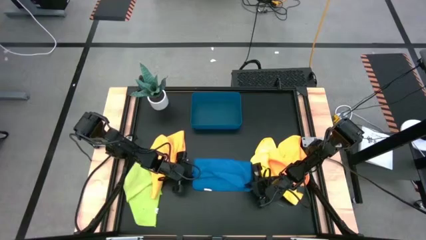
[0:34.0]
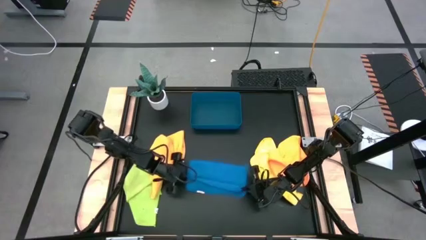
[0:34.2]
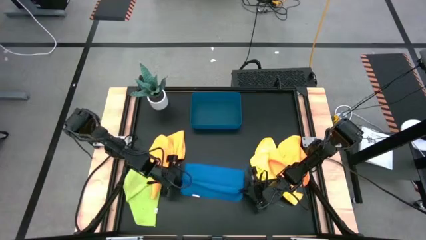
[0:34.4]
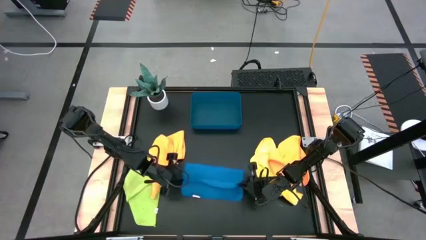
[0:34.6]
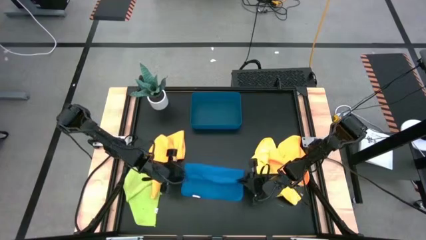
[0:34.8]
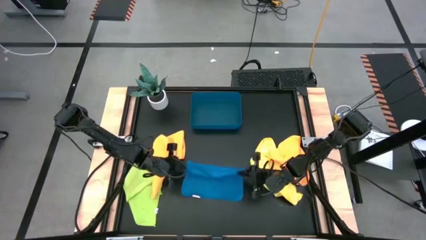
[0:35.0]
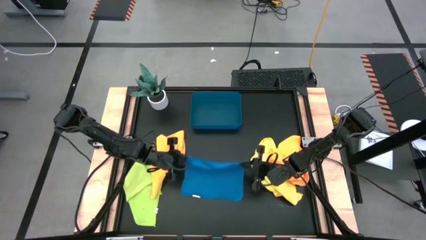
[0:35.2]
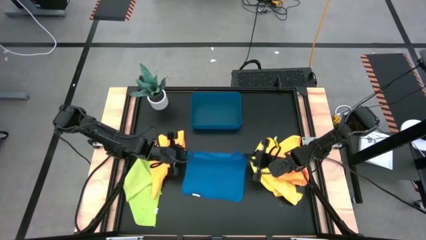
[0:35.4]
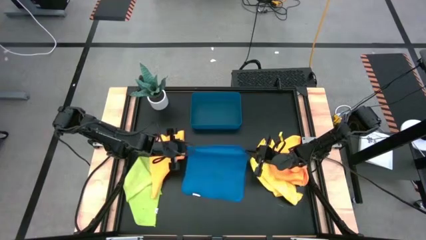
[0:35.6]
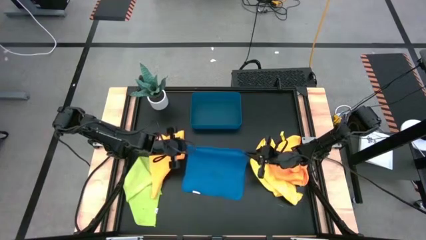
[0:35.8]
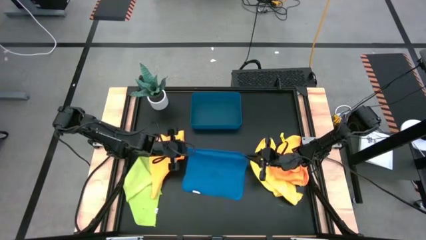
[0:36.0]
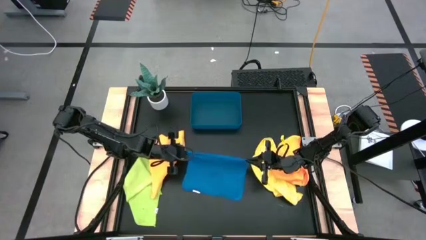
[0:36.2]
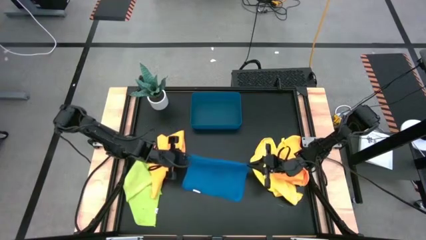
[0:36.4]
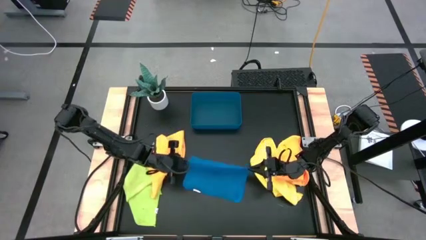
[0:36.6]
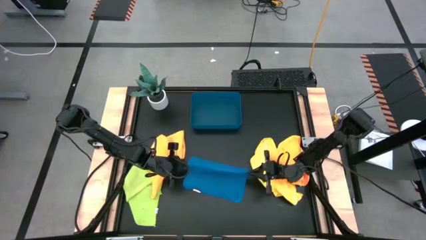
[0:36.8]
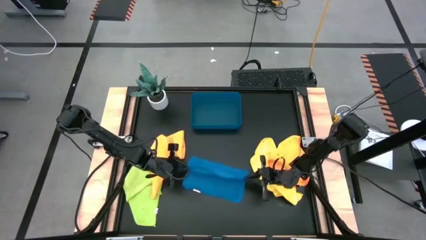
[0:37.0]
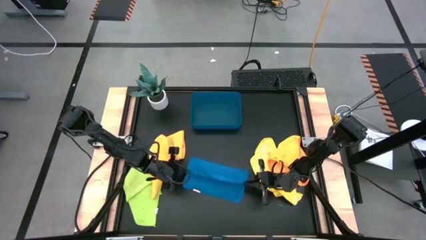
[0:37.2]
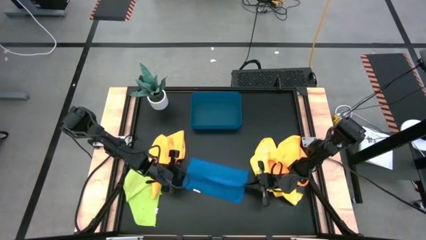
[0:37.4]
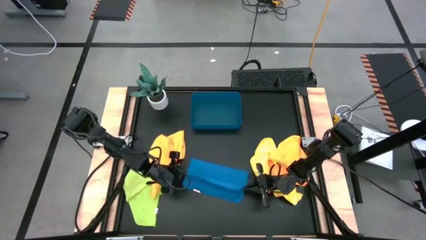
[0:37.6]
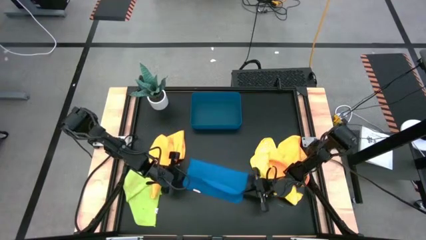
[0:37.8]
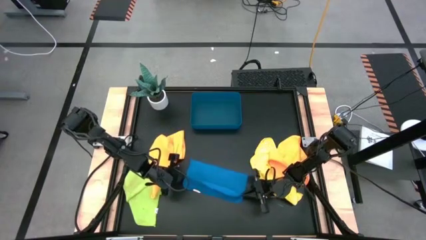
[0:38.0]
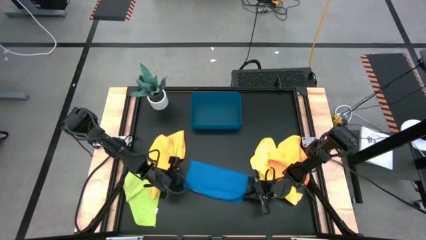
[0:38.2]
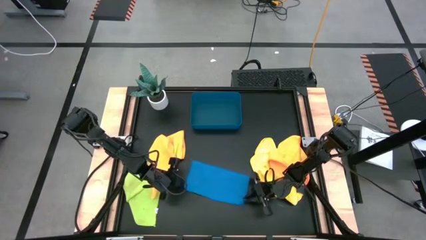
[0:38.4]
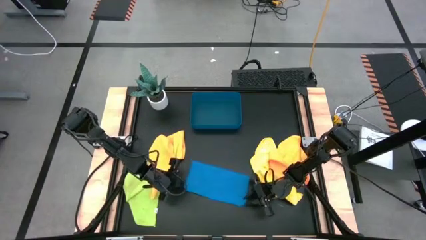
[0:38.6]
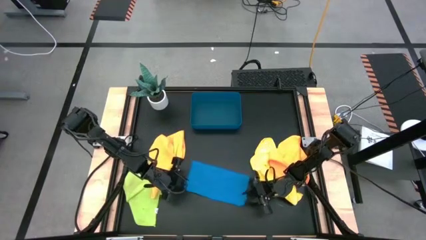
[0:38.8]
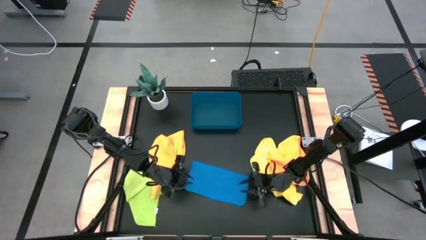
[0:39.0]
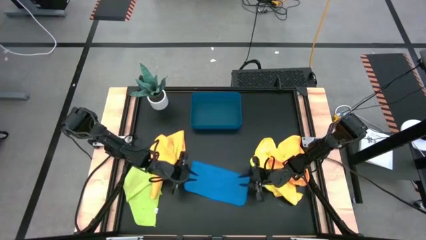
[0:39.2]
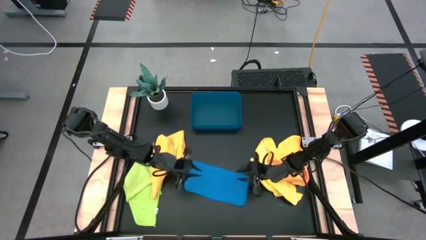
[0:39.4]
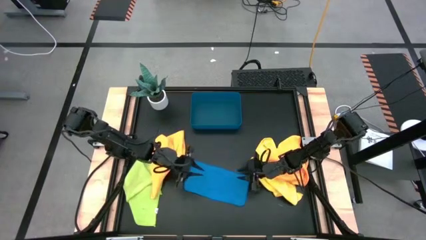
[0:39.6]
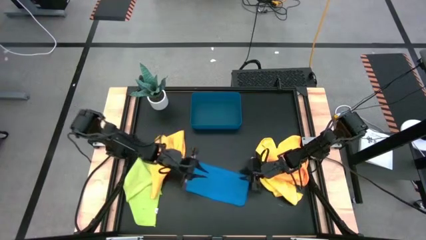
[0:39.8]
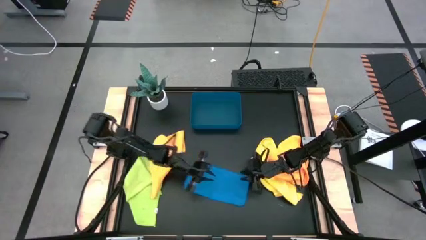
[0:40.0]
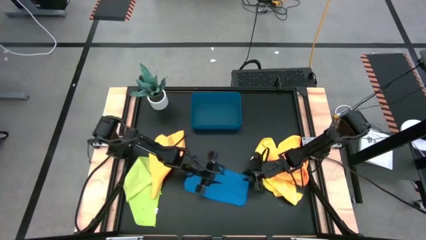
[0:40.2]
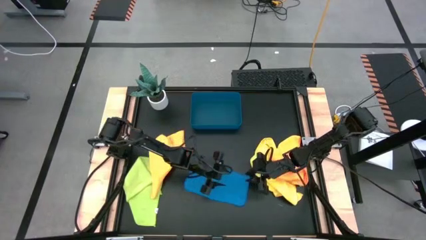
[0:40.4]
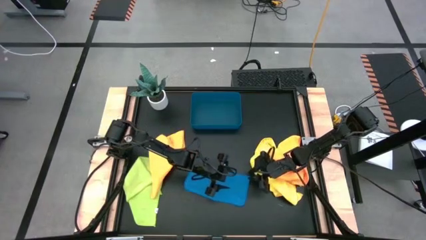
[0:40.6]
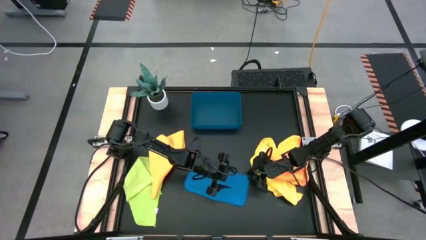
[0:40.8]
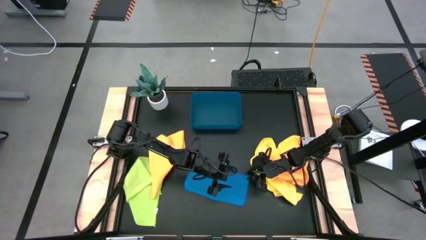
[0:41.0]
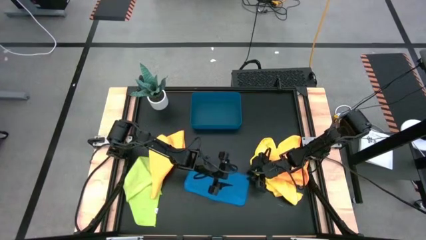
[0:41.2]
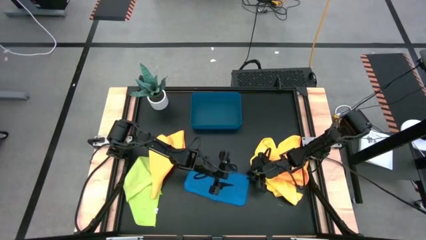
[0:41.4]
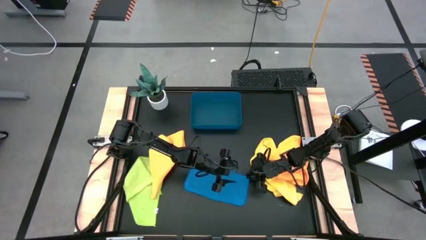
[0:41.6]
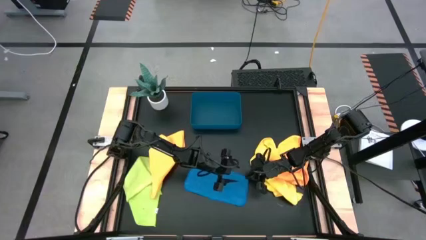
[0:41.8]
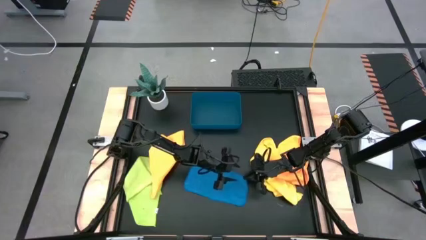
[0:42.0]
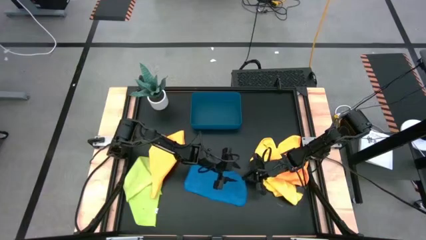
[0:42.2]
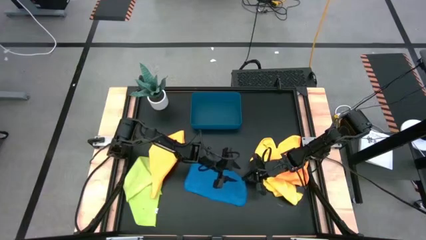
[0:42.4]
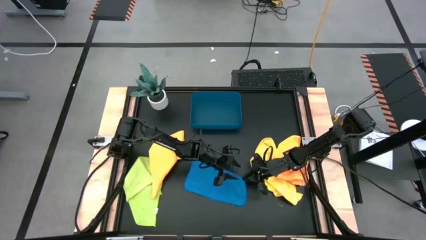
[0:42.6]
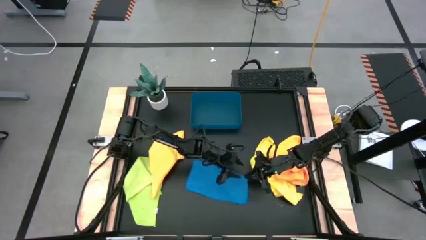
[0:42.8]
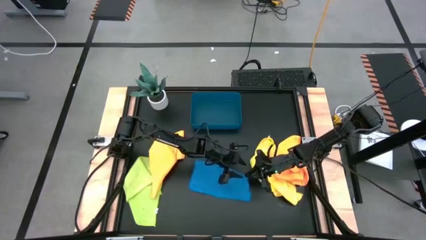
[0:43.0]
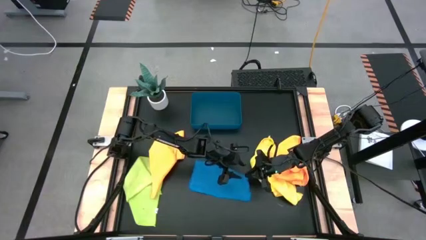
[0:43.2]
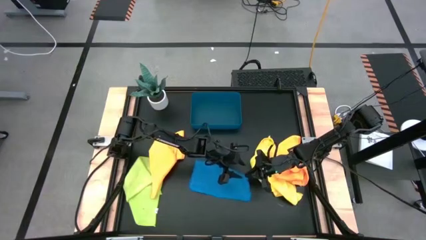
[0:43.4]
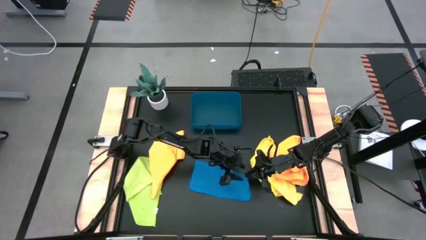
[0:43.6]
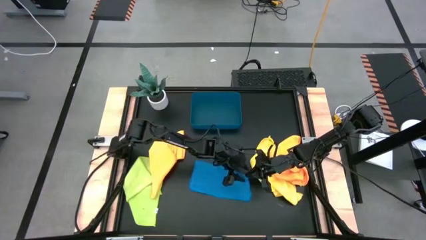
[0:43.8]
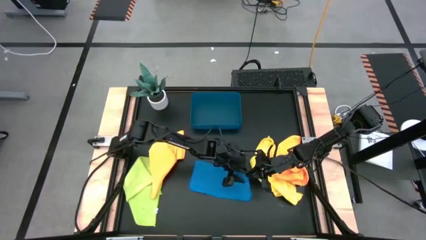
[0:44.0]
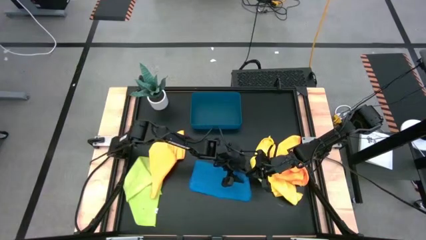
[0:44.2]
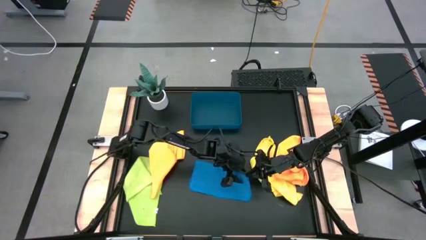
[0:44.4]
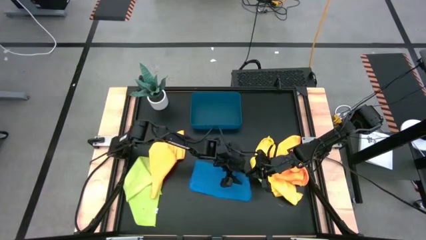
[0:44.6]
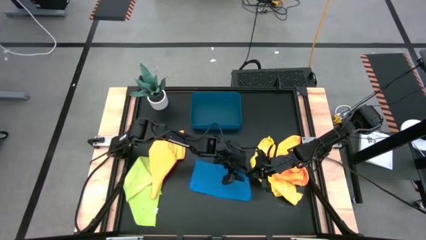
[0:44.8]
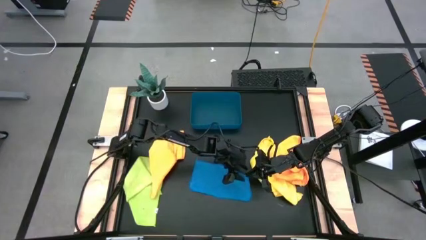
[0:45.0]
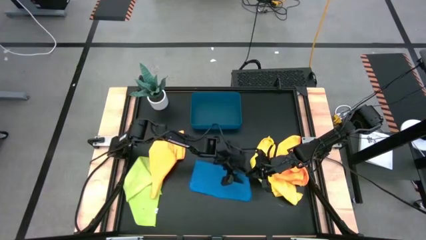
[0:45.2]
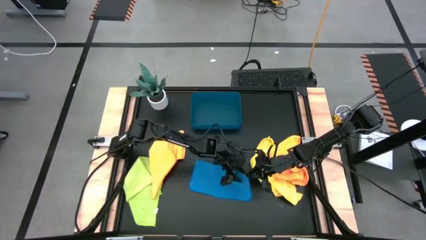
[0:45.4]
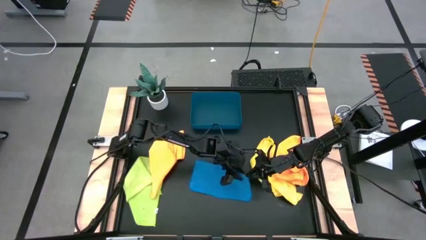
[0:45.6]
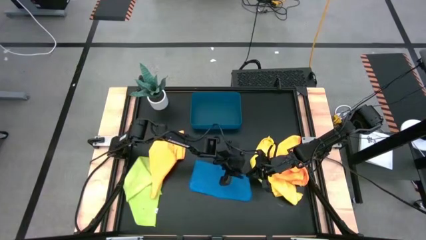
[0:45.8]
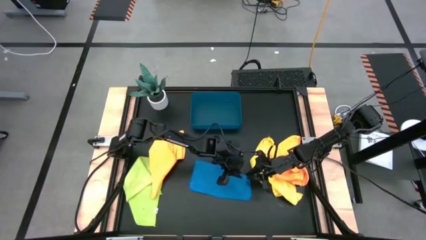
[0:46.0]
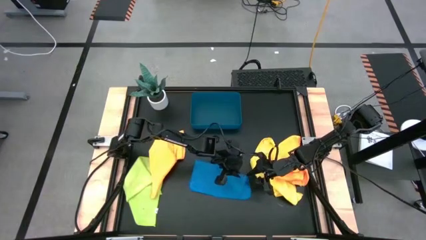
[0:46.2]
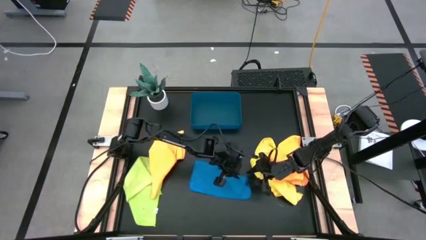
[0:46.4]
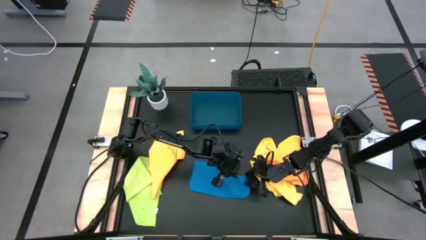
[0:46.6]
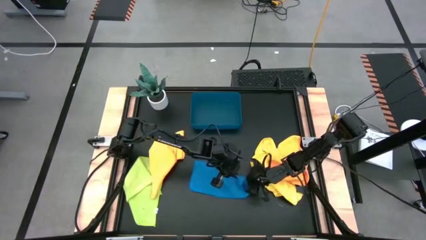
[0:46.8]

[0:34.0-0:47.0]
Task: Fold microfiber towels
Fold the blue microfiber cloth
